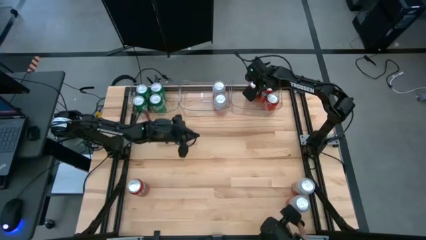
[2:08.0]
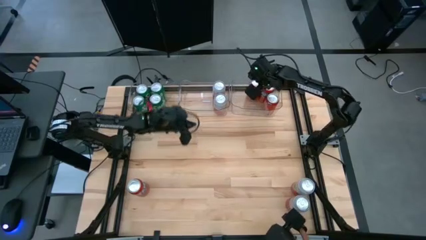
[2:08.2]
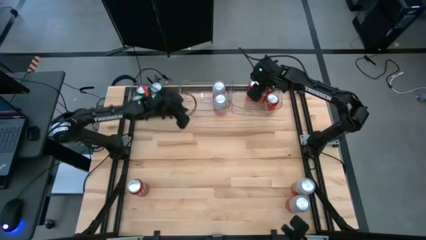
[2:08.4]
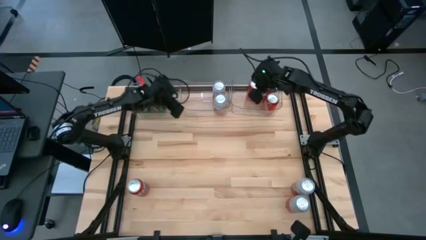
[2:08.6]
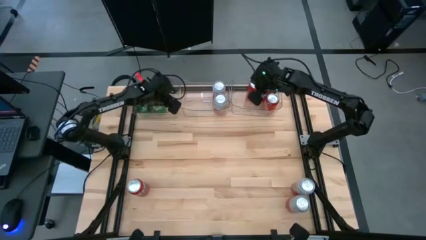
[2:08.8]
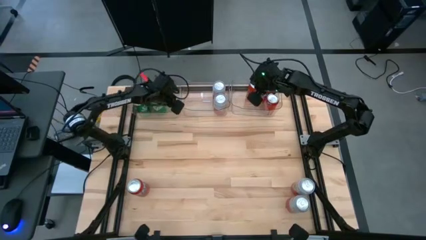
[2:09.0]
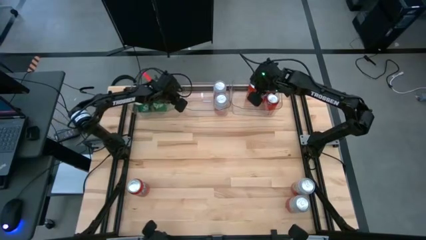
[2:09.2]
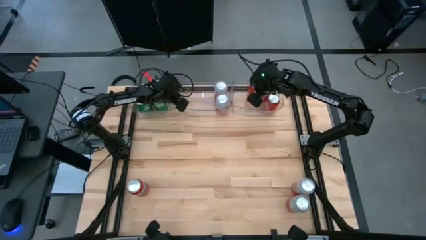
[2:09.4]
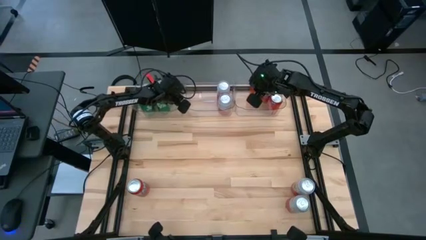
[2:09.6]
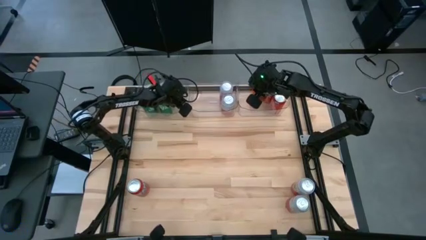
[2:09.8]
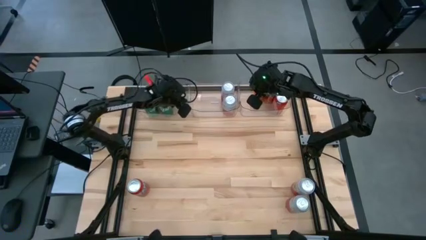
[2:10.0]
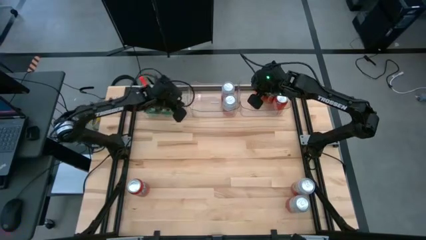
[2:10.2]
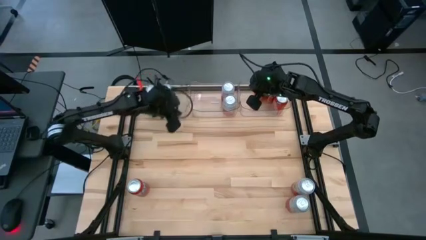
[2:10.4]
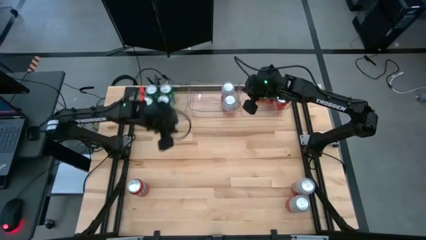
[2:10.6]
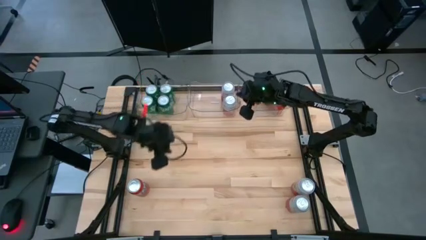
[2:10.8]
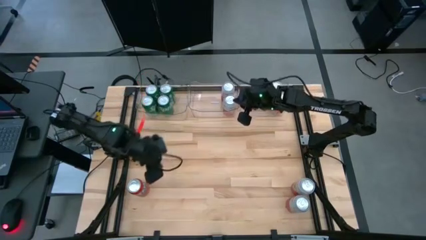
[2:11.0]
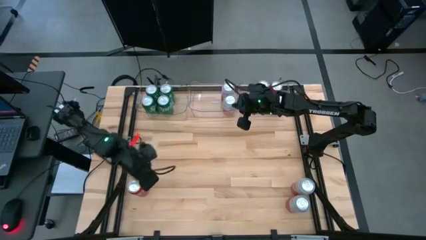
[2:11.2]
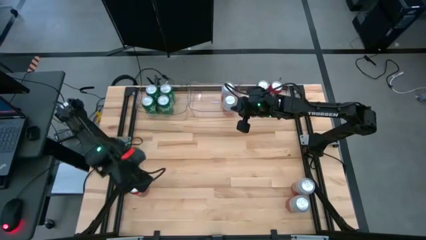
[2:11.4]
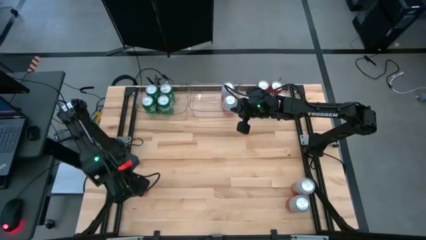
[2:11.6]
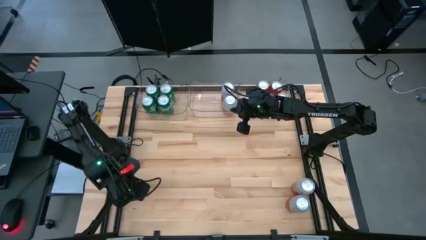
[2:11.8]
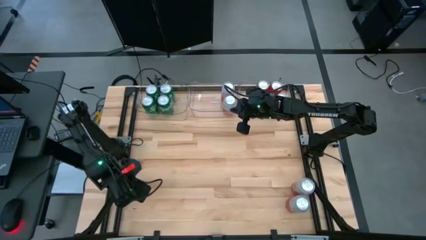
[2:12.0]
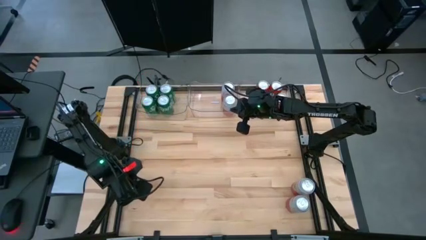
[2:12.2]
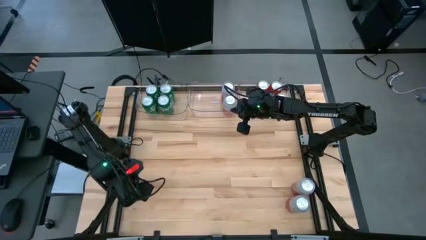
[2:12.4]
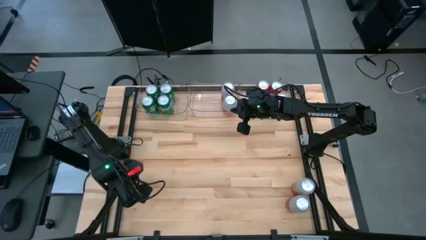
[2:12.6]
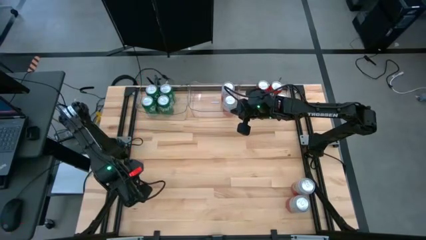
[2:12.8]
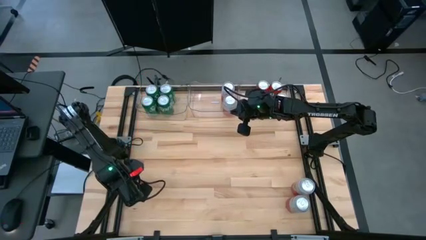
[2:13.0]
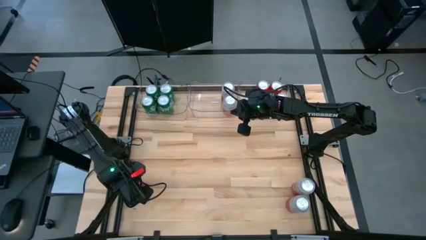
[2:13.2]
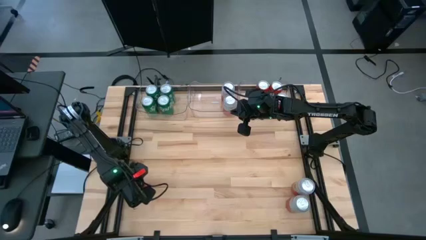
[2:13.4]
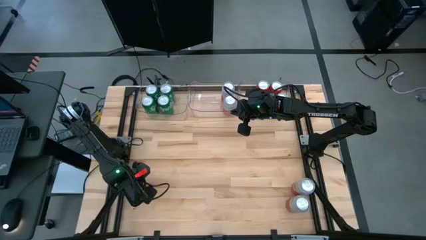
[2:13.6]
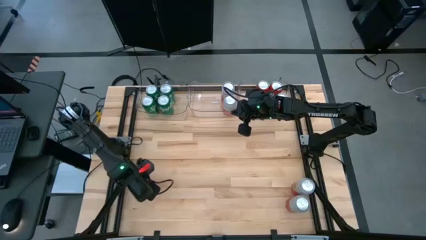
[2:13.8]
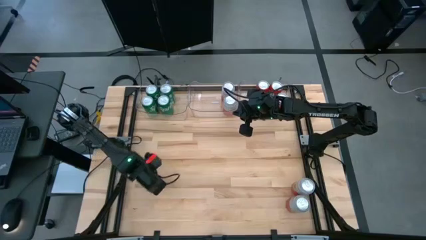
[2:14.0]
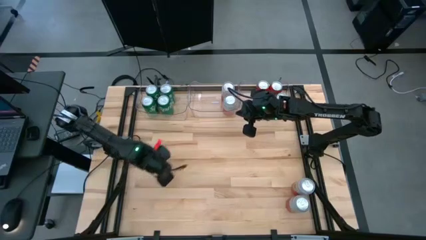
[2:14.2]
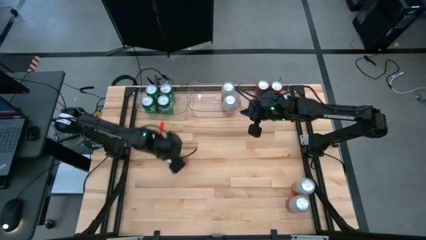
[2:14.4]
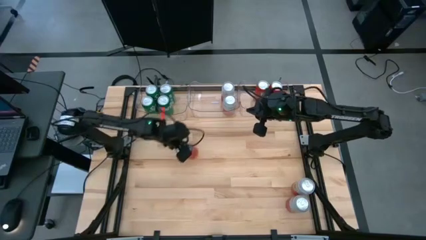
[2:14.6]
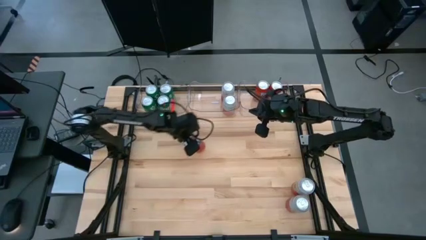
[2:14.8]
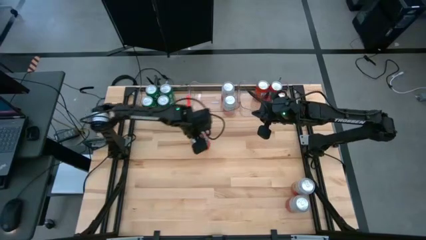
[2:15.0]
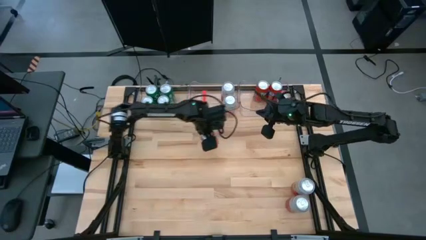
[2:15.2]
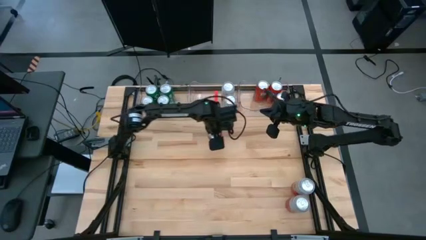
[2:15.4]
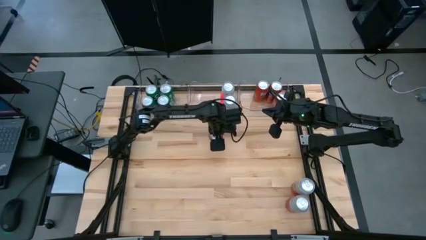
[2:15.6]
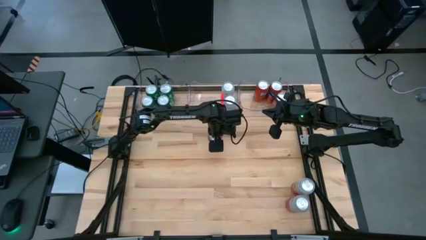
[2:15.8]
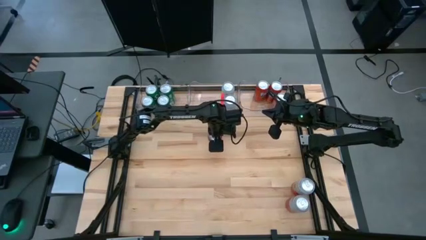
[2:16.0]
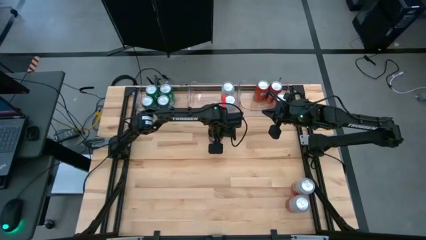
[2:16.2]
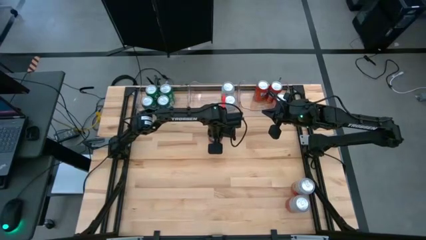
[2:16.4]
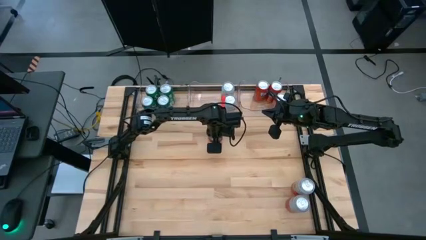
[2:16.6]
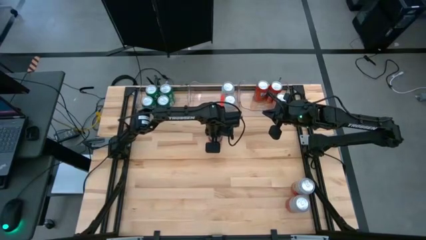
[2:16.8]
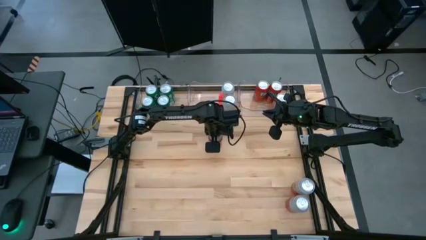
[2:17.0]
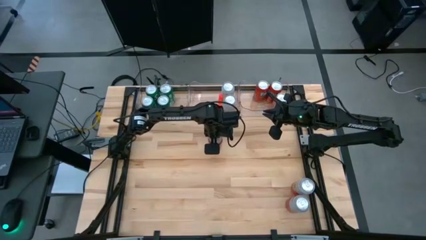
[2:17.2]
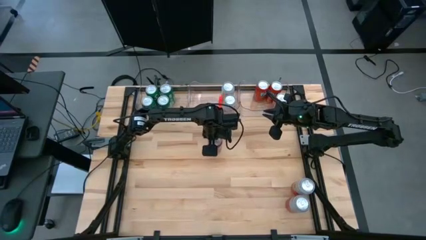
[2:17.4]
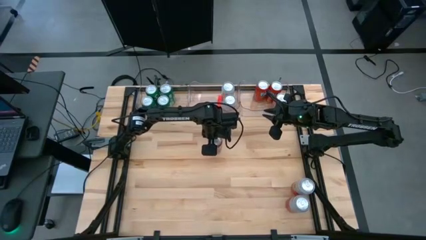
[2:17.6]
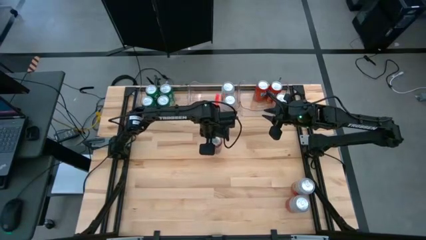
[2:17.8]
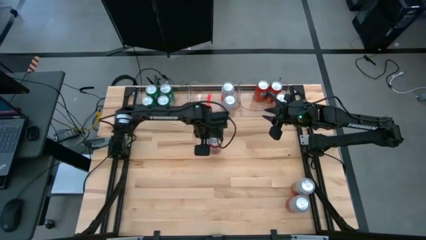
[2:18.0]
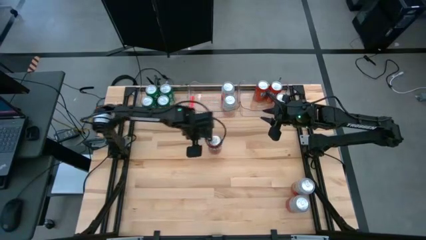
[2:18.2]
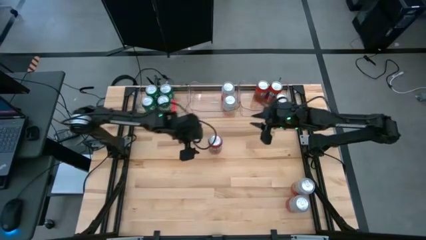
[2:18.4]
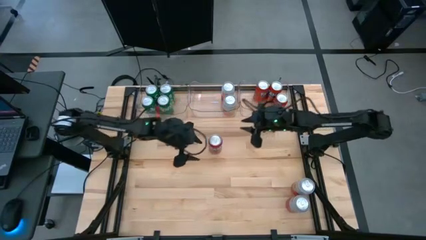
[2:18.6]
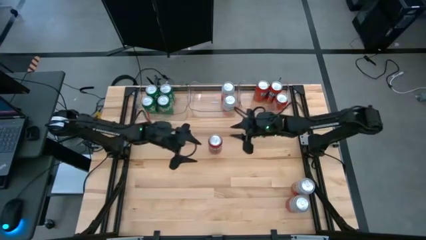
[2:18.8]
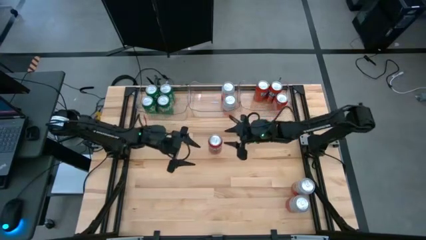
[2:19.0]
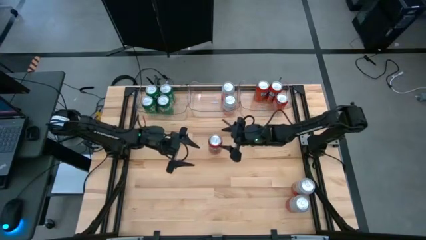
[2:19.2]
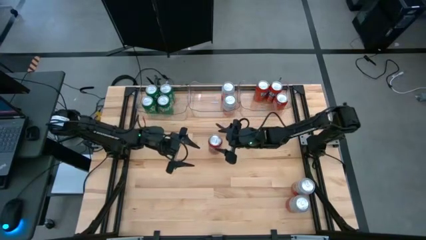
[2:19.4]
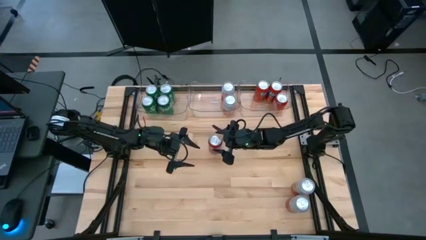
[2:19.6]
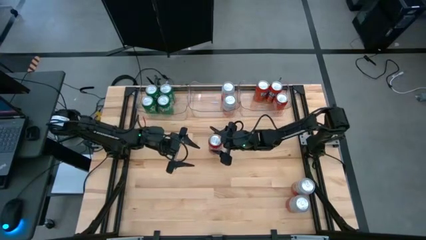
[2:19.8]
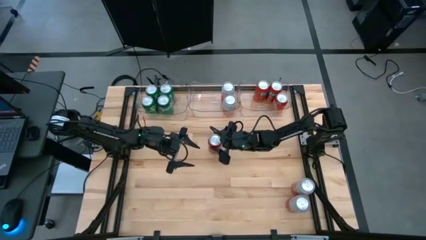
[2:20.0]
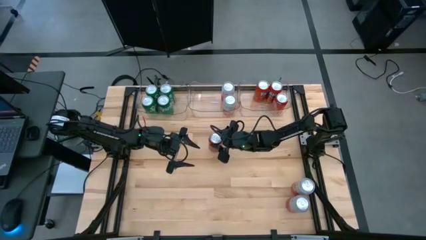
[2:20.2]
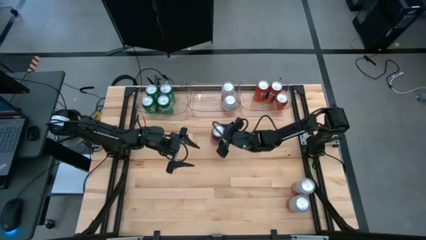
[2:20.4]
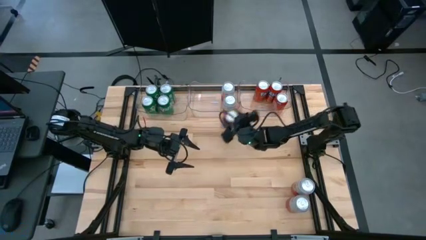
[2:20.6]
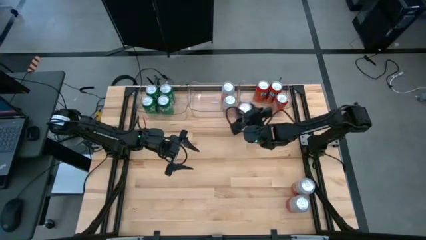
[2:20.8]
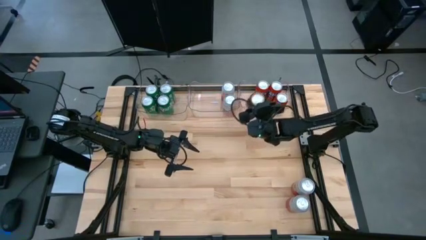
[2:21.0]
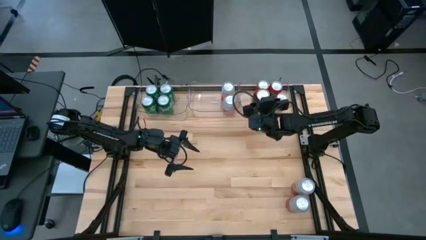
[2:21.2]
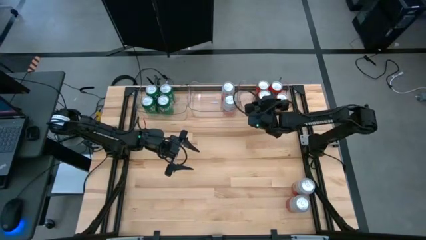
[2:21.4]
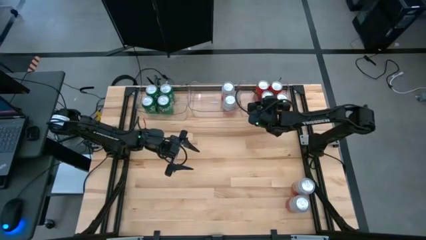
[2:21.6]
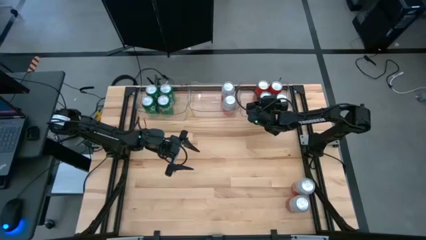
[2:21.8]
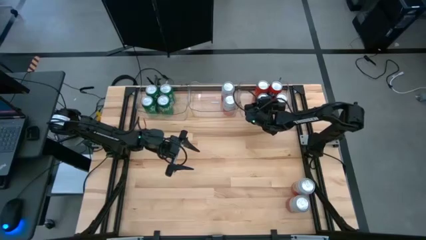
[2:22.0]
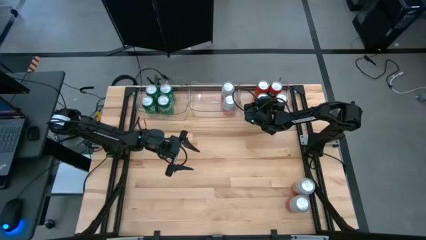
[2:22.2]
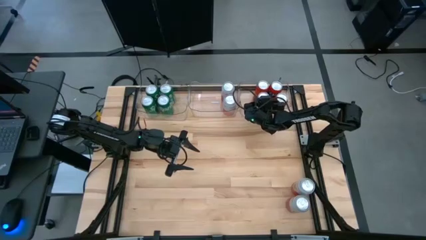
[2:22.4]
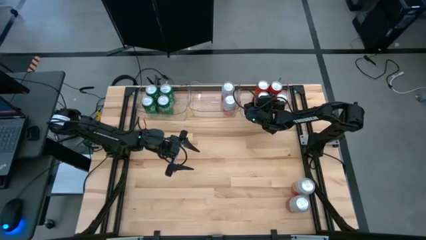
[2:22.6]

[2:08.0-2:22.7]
Task: Sort soda cans
Put the red soda can into the right transparent bin
